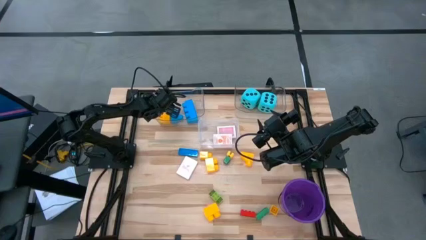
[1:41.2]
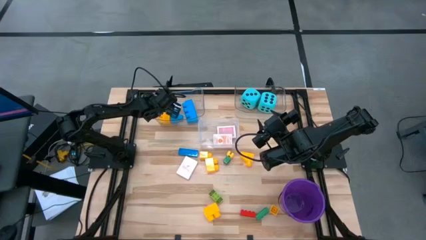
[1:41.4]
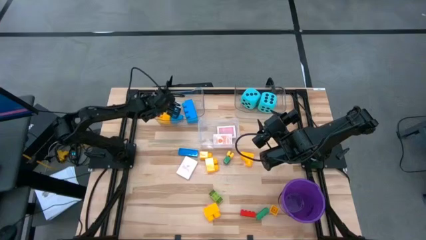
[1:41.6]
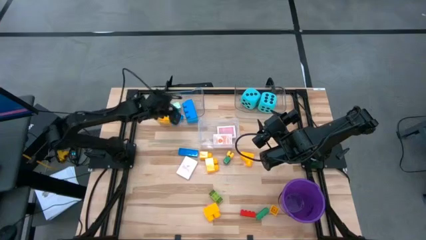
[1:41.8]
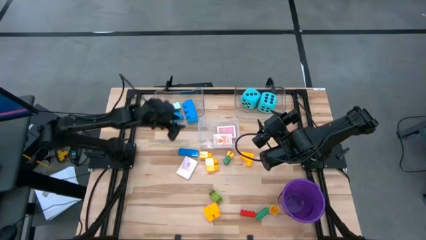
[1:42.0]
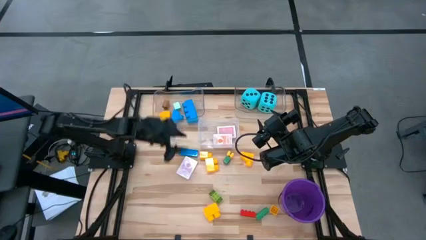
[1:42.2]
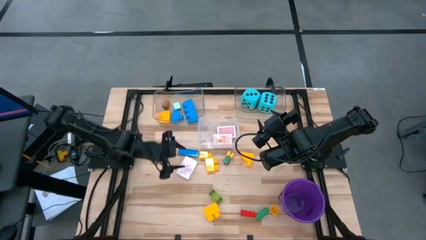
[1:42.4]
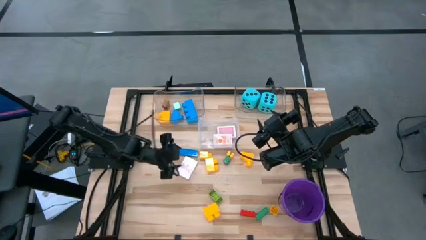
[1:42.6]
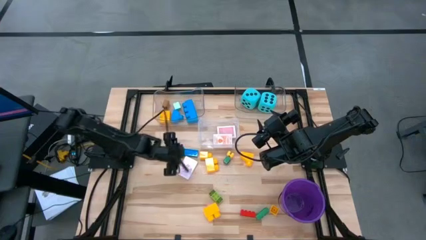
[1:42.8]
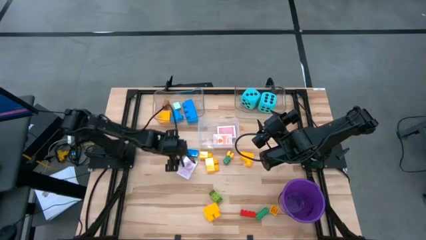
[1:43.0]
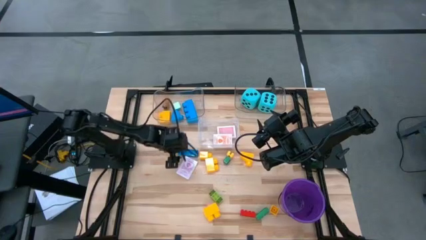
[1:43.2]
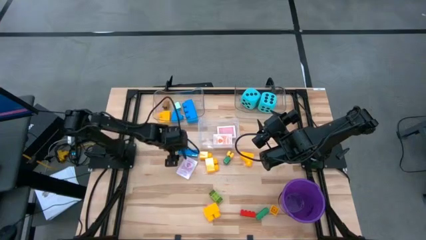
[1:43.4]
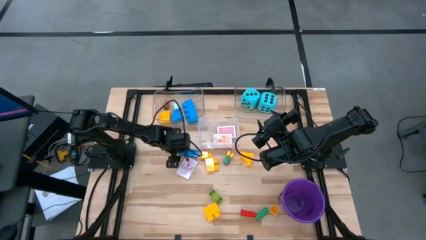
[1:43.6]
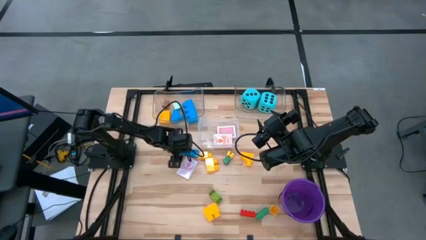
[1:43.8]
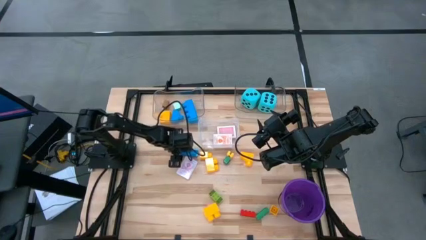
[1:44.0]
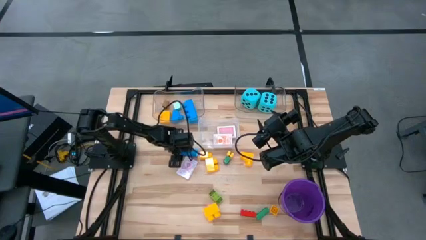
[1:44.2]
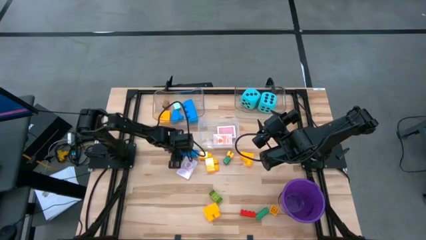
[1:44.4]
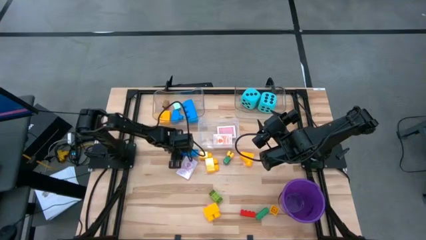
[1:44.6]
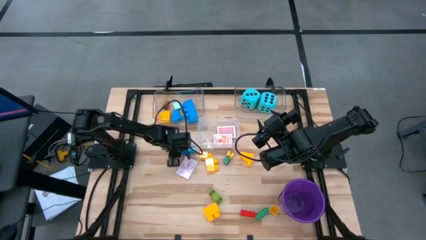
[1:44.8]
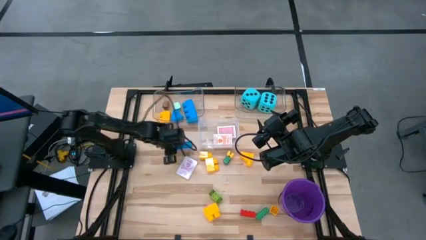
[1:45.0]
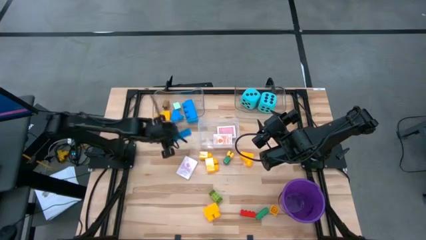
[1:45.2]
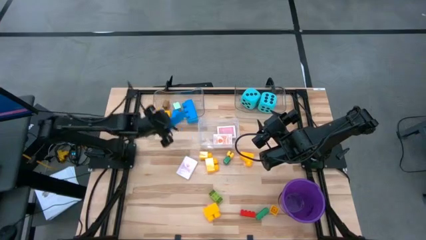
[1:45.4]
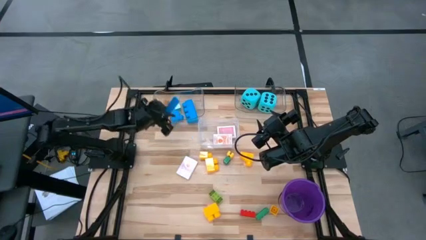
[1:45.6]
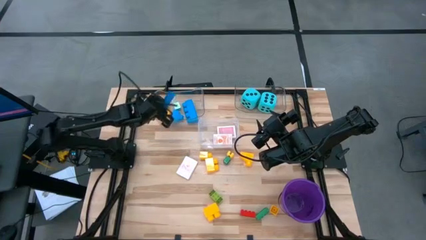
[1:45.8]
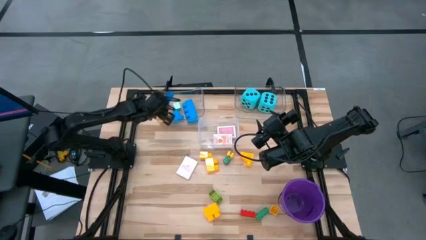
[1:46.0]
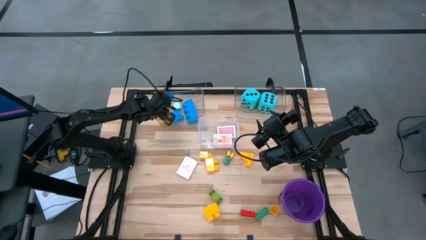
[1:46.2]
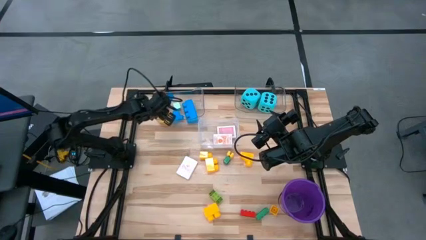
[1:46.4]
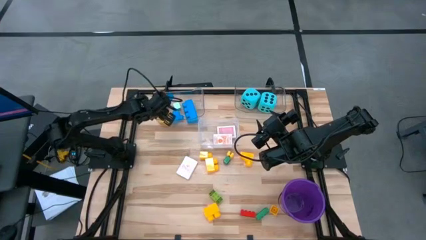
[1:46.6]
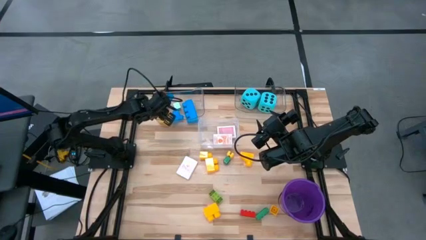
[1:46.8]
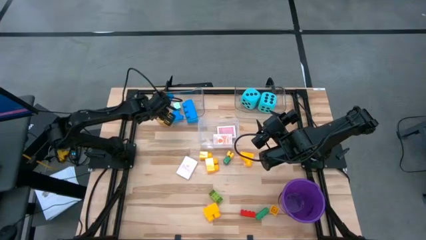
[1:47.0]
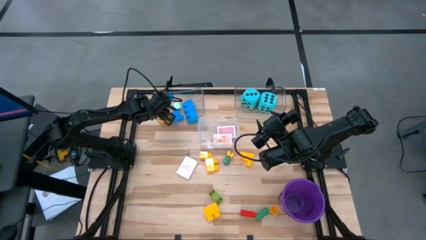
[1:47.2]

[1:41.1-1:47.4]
Task: Pick & Place Toys
Put the blue game piece into the top left transparent bin

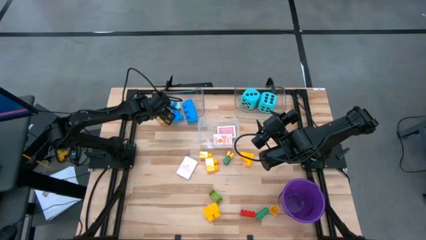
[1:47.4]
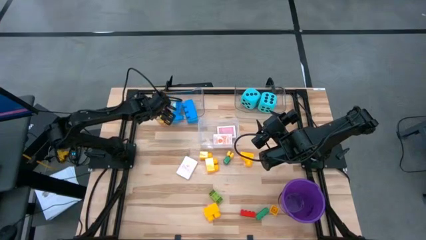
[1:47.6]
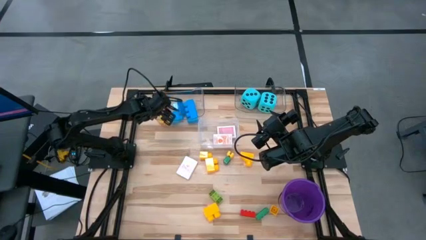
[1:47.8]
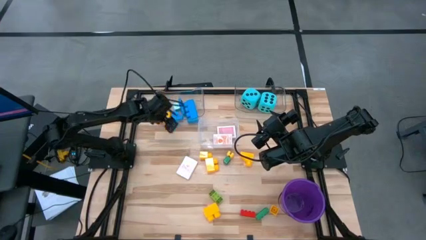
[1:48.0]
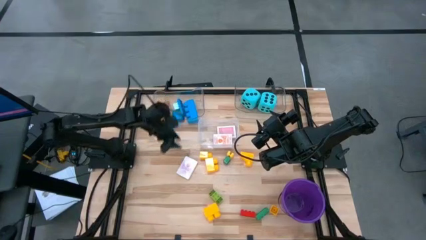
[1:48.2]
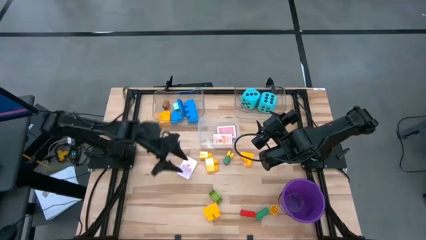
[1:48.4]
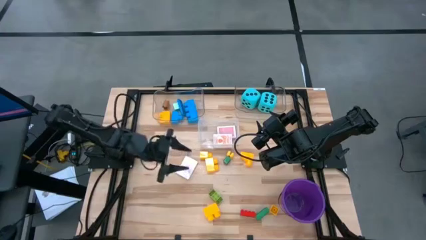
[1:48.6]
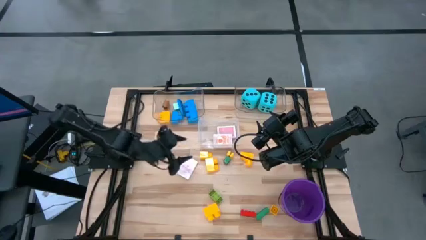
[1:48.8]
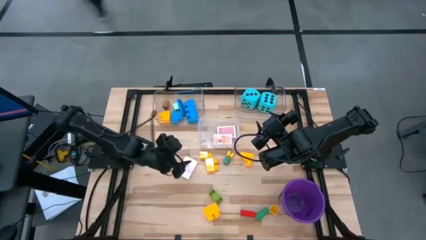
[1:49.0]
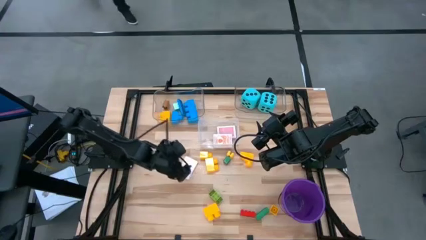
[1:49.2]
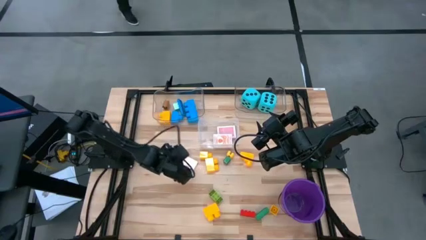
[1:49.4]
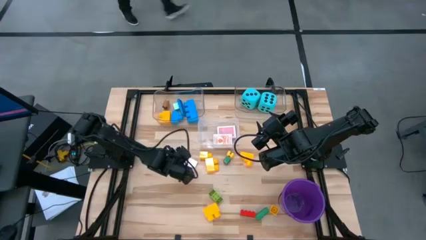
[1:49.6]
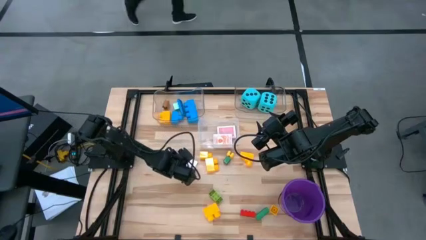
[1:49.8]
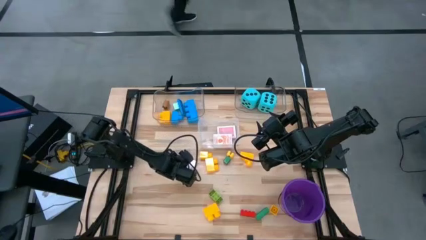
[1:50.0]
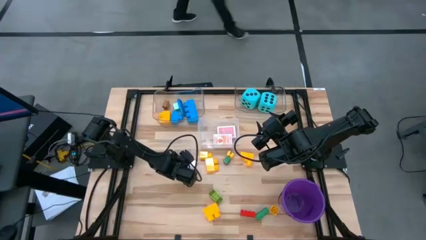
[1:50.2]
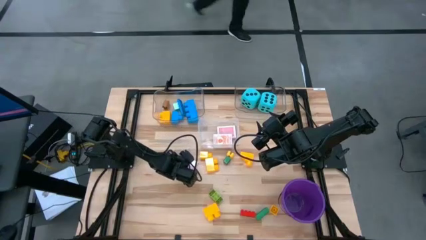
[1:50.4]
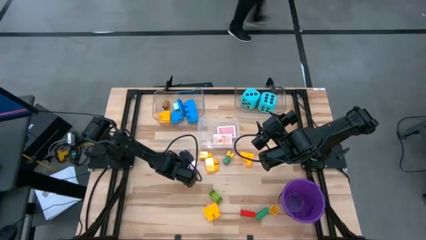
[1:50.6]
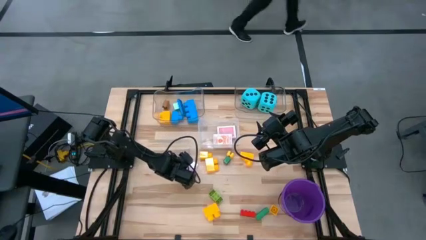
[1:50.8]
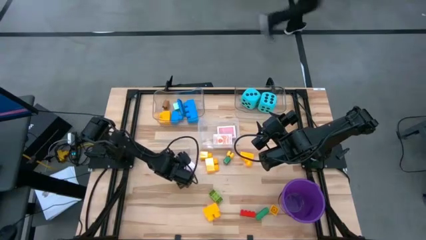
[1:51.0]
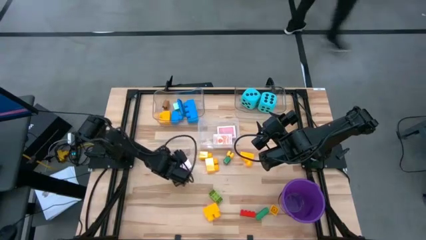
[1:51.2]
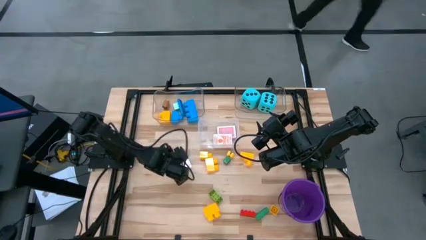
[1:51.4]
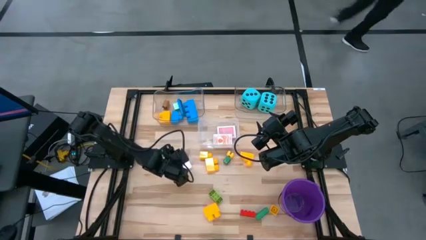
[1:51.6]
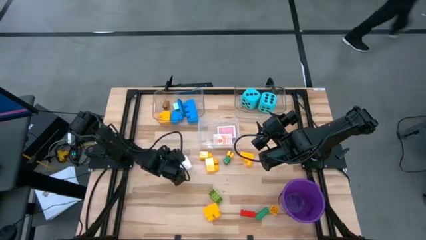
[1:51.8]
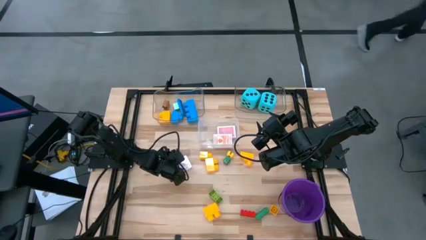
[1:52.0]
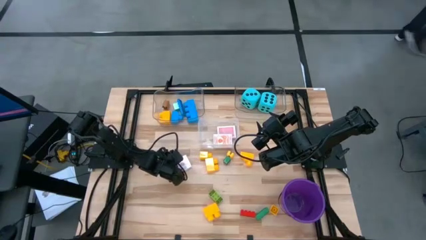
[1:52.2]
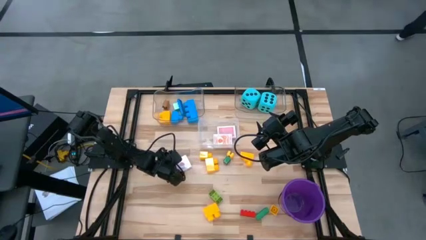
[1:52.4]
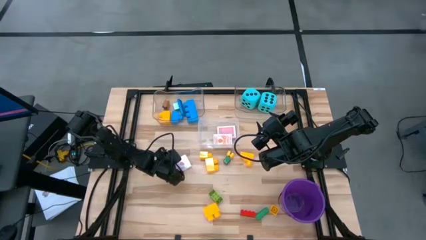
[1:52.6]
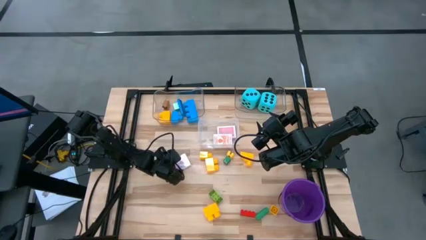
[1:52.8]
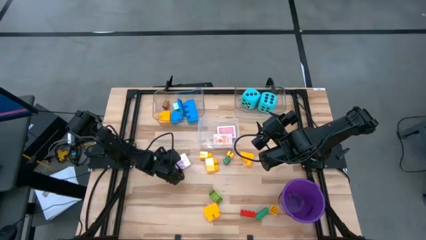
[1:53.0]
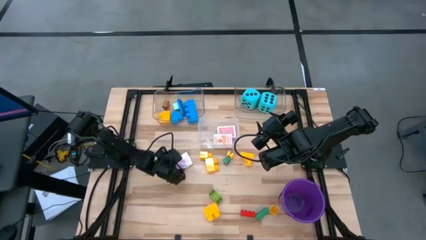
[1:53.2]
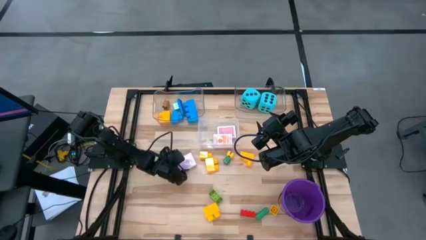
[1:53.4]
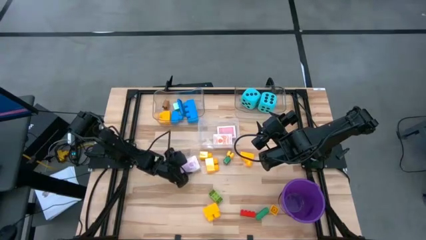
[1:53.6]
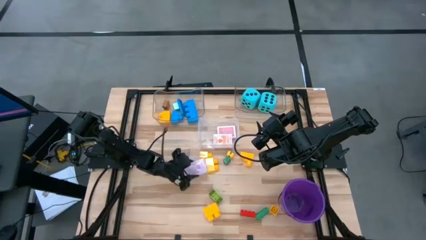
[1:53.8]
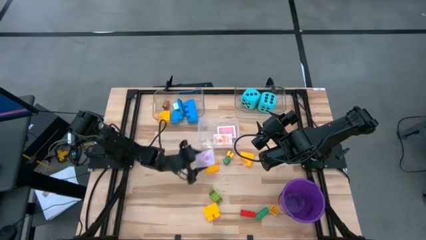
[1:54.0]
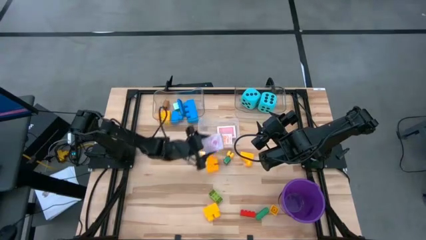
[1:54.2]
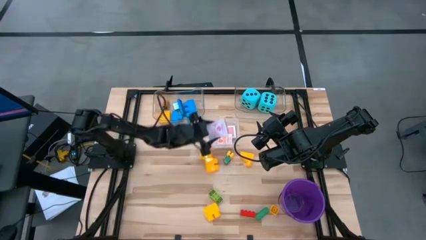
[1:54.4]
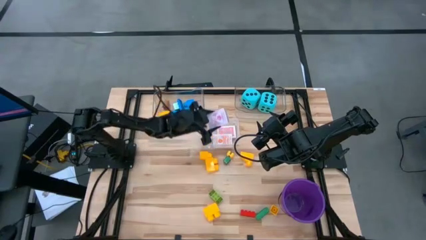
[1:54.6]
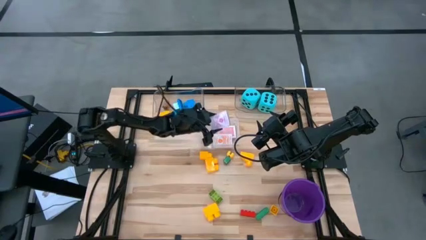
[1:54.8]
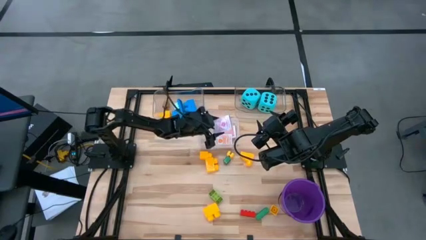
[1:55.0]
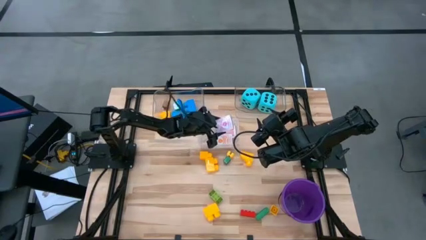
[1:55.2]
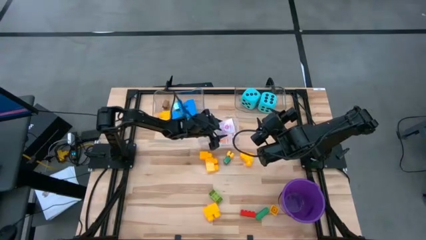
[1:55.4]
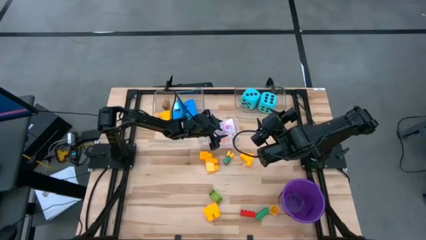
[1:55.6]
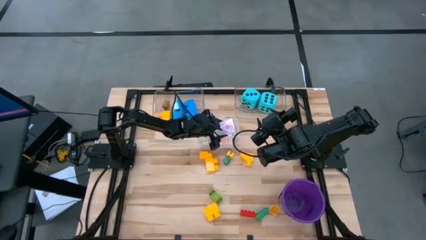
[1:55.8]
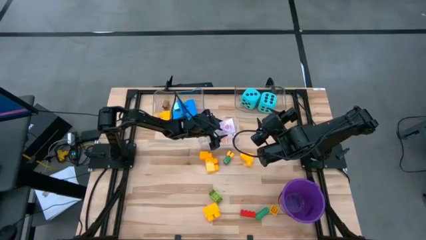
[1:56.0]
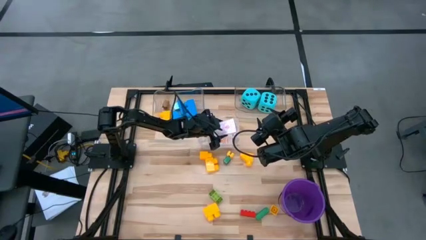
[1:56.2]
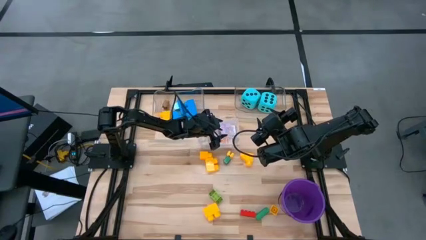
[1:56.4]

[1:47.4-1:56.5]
Put the pink deck of cards into the bottom transparent bin

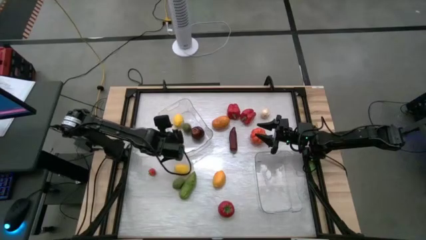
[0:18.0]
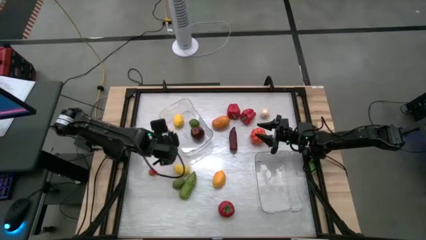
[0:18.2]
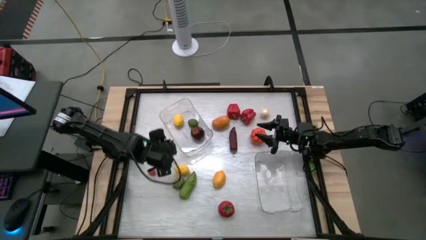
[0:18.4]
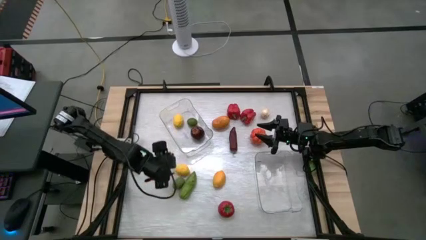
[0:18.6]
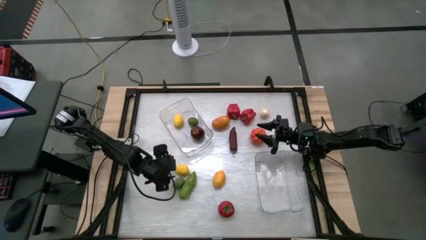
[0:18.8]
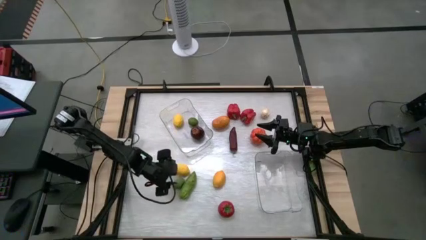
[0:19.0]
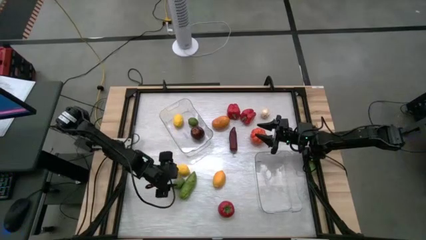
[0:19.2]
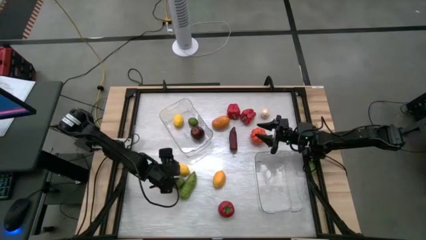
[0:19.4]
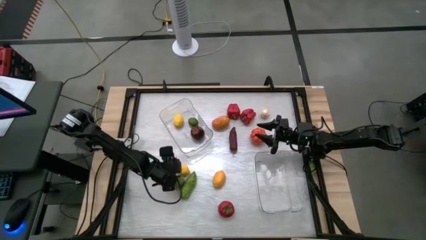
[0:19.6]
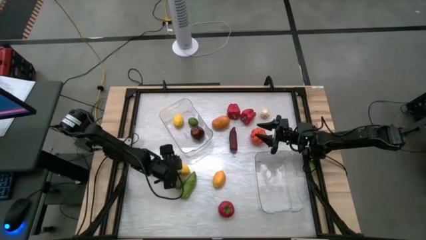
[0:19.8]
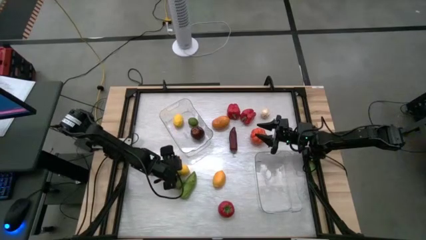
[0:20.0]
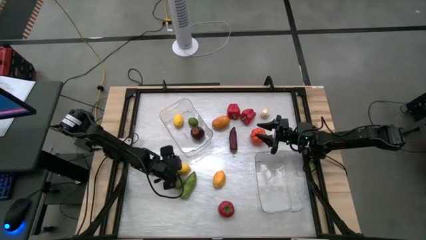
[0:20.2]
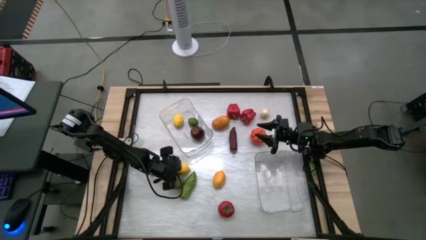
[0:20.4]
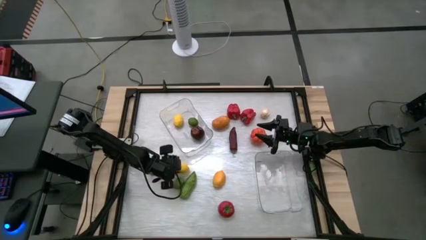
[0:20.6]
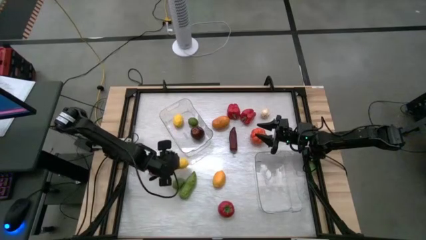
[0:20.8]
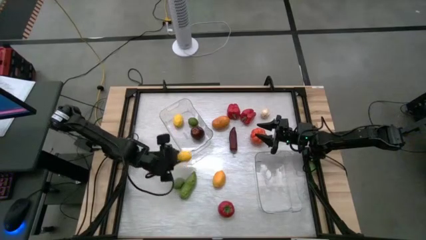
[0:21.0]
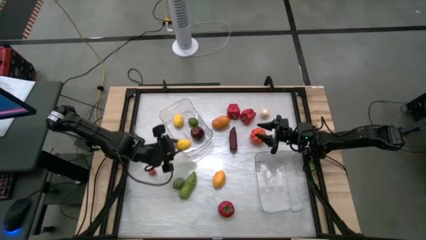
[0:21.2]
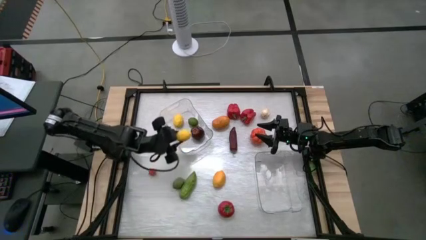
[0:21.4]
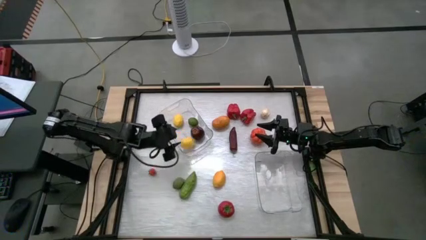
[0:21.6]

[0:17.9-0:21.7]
Task: Sort produce into baskets
Put the left yellow lemon into the top transparent bin
